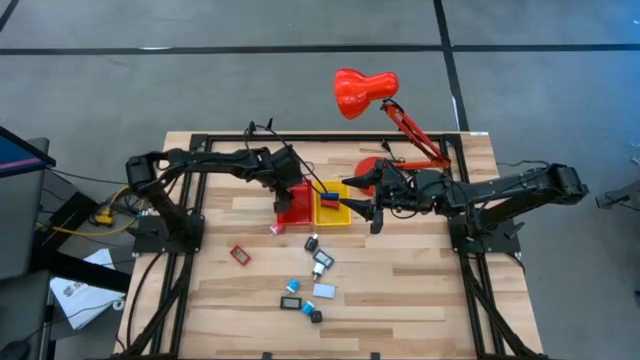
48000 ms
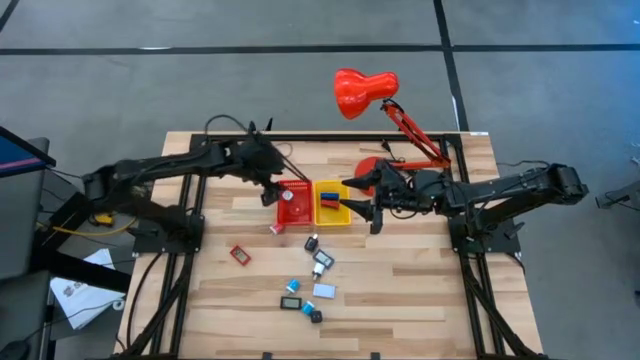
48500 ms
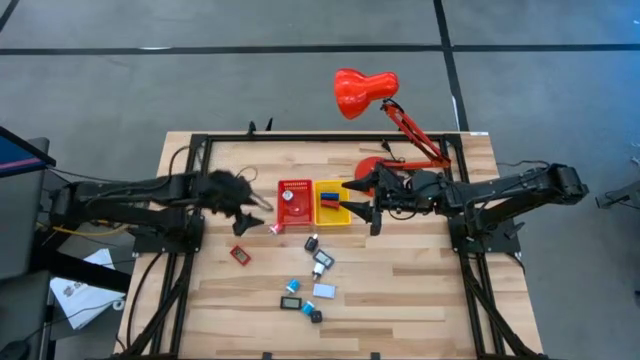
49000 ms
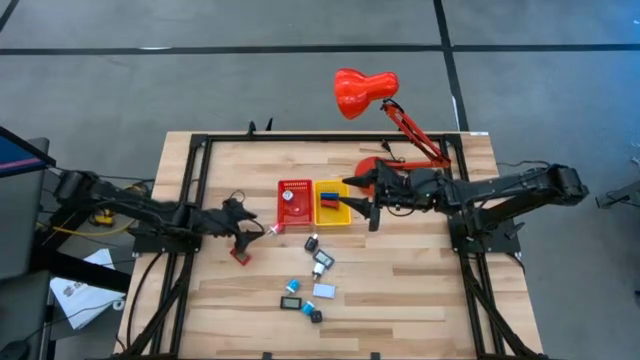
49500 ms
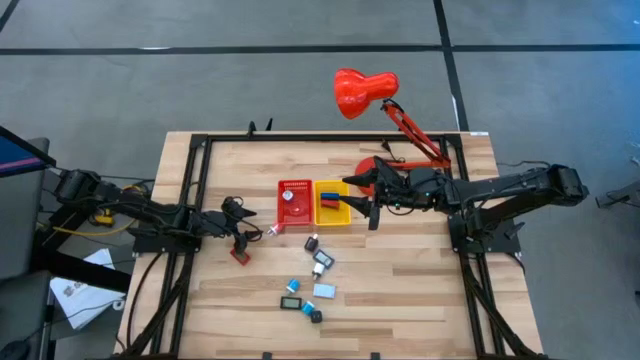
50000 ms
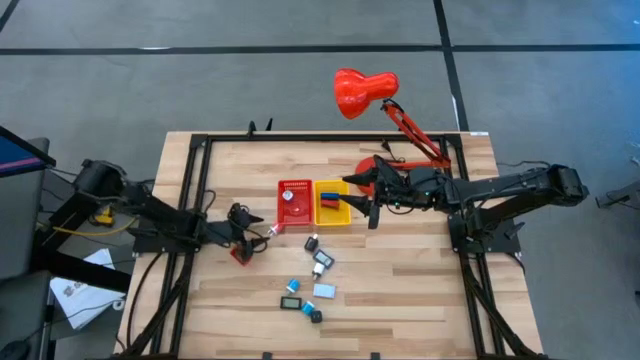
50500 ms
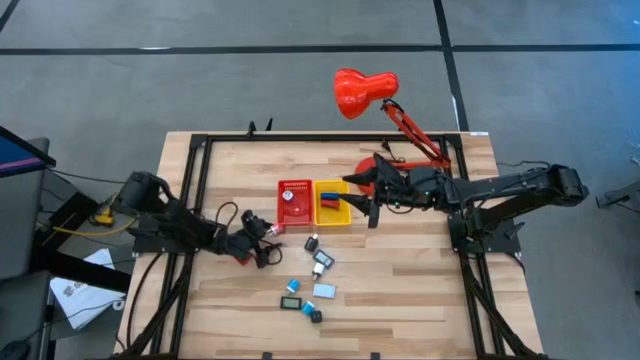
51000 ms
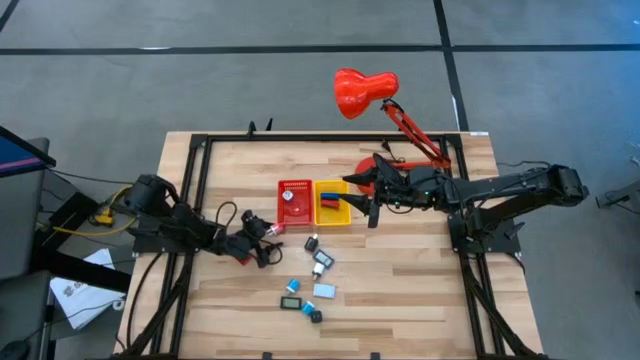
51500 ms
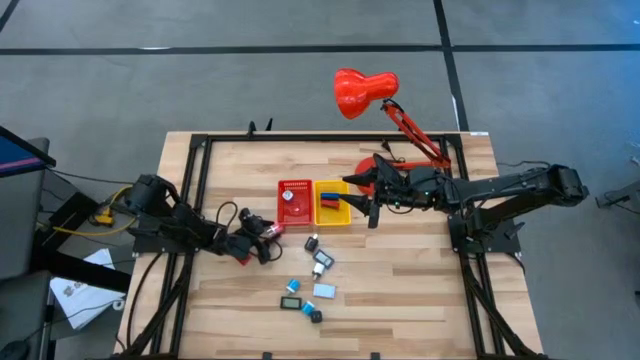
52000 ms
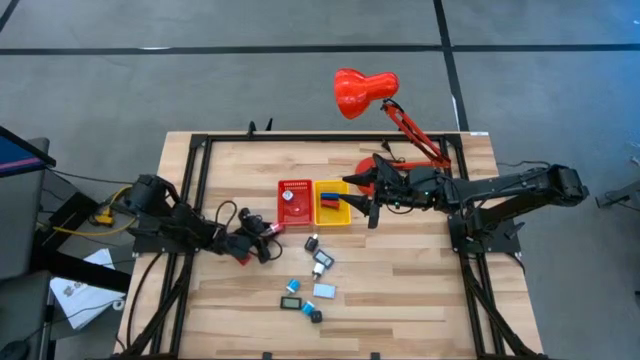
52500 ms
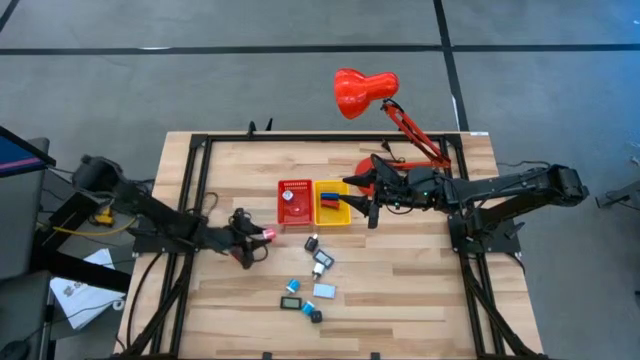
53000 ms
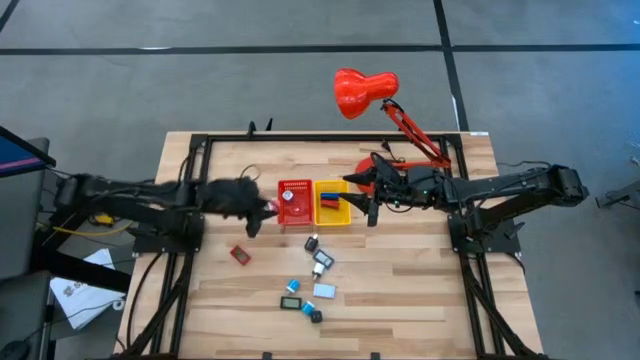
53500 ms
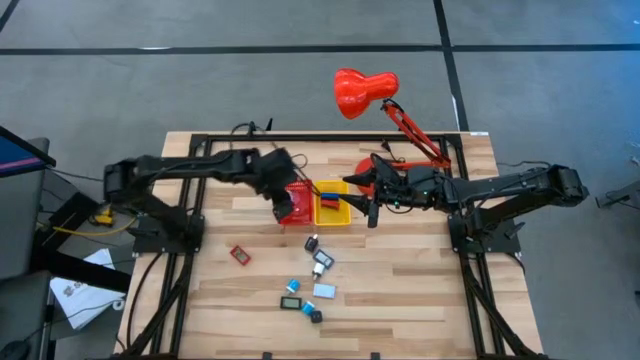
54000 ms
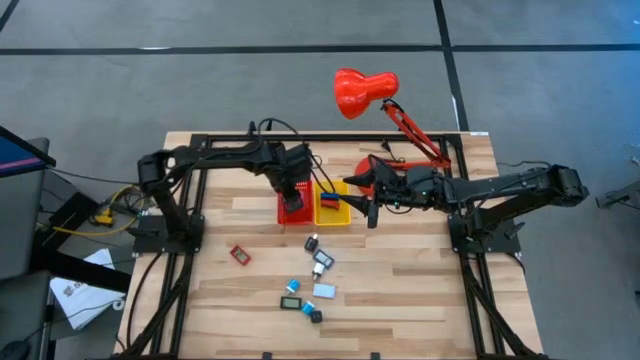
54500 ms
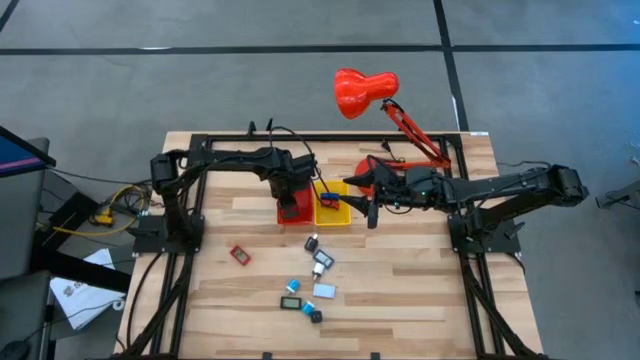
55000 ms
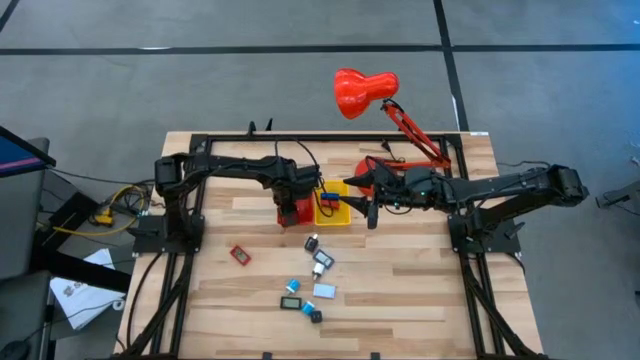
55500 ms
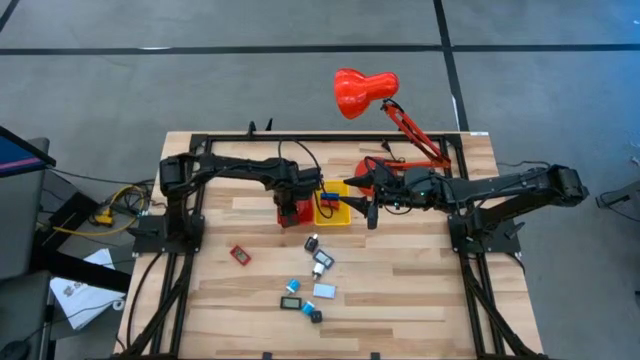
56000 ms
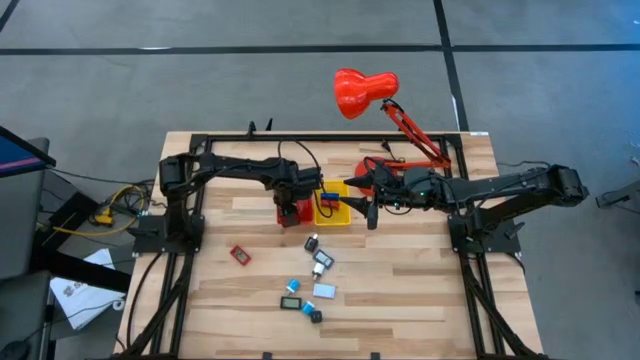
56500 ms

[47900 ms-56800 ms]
Task: Pick & Place Office items
Put the red charger adapter into the red basket

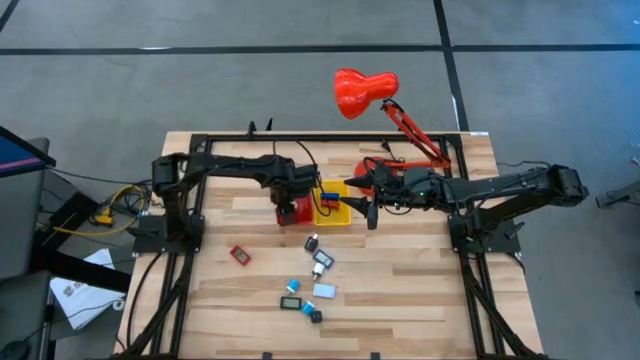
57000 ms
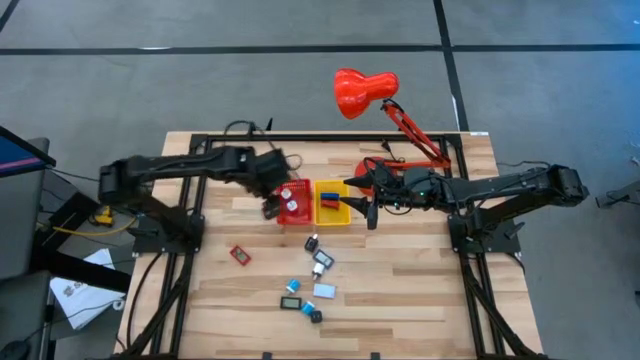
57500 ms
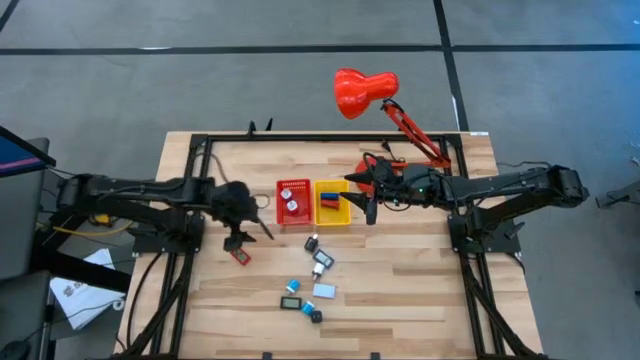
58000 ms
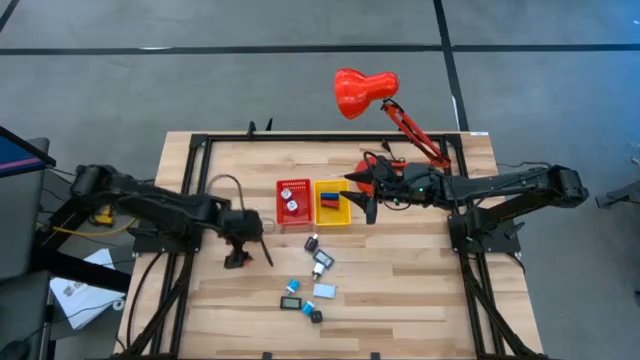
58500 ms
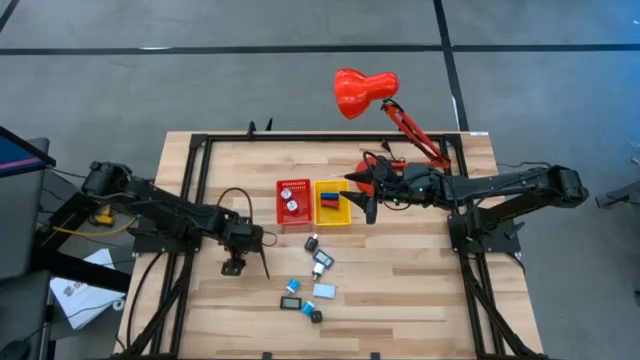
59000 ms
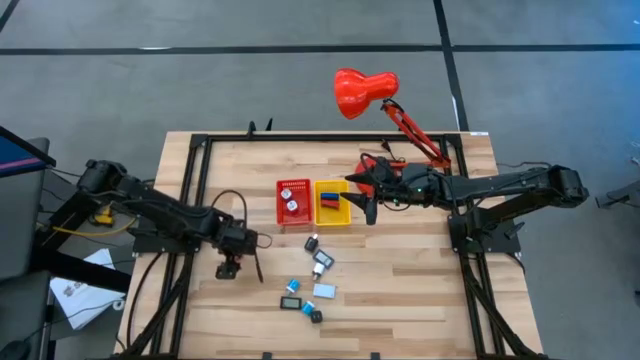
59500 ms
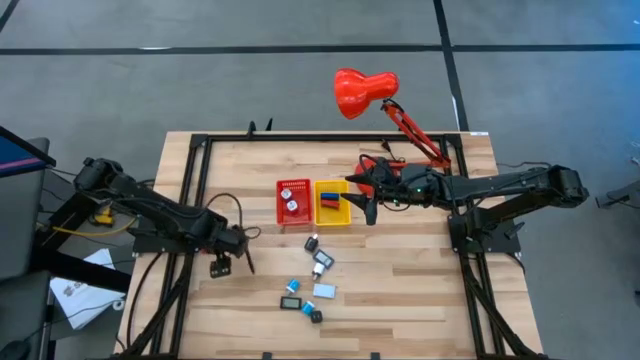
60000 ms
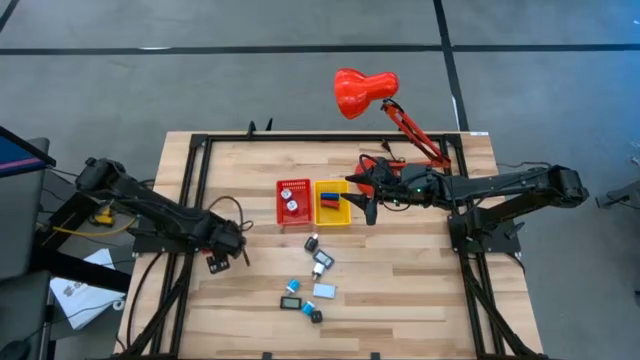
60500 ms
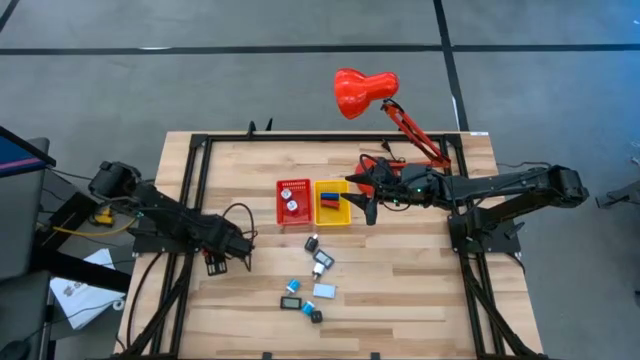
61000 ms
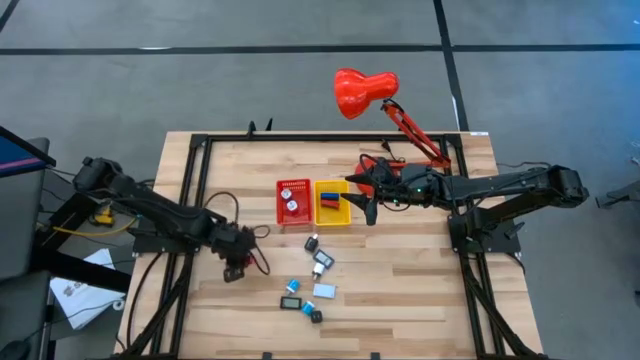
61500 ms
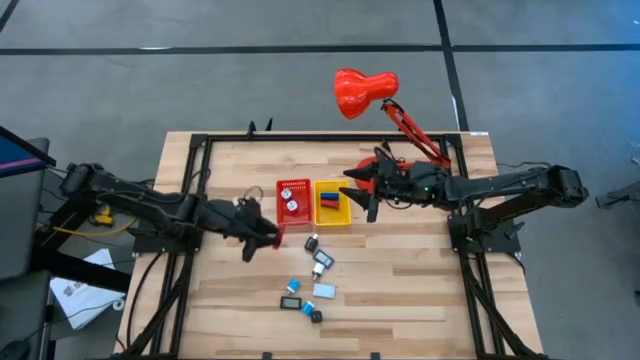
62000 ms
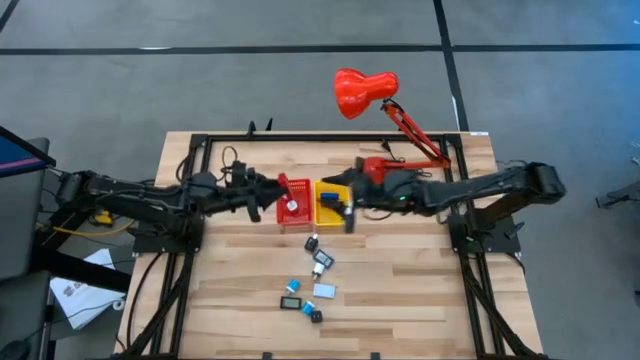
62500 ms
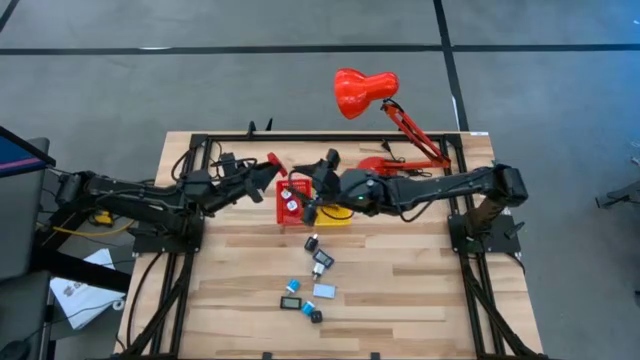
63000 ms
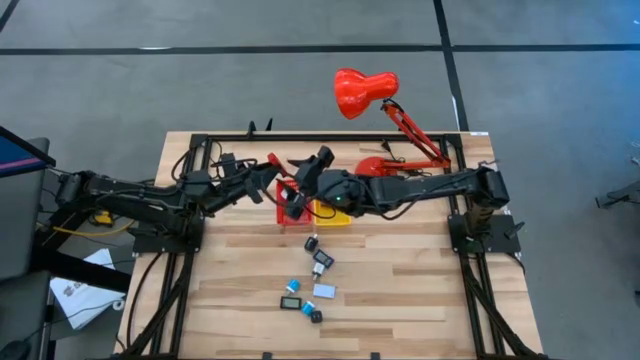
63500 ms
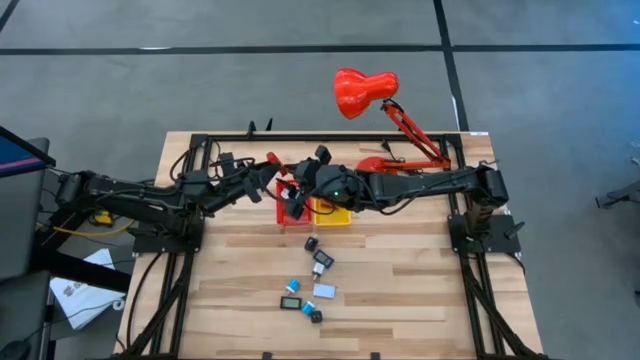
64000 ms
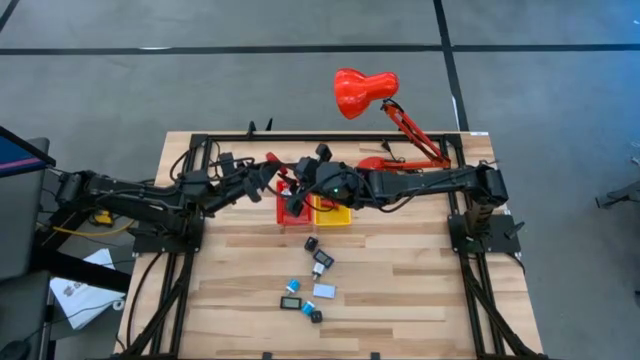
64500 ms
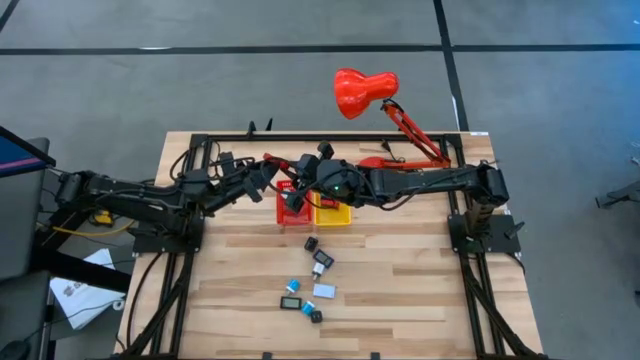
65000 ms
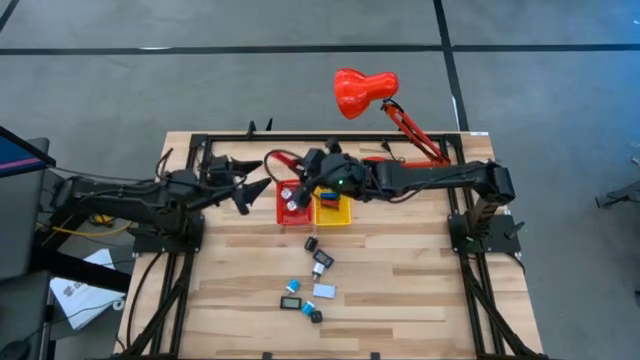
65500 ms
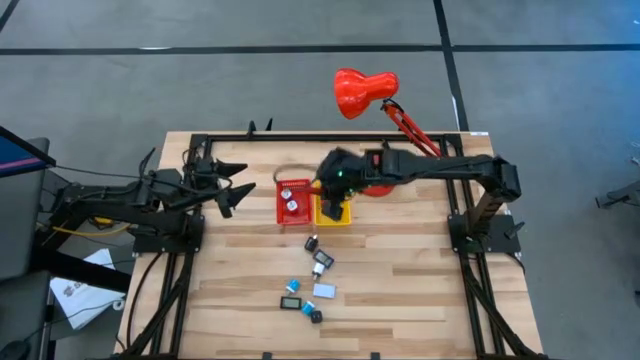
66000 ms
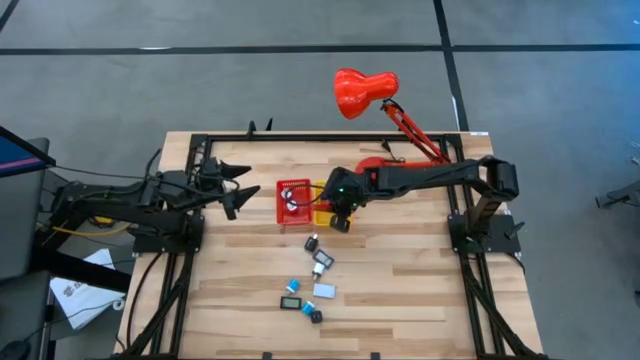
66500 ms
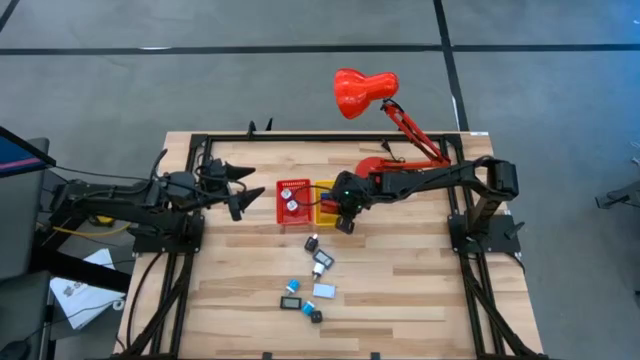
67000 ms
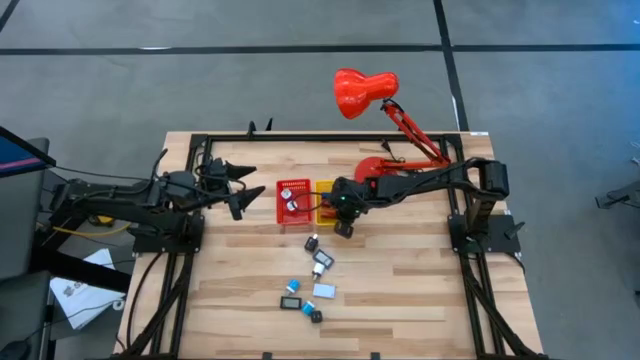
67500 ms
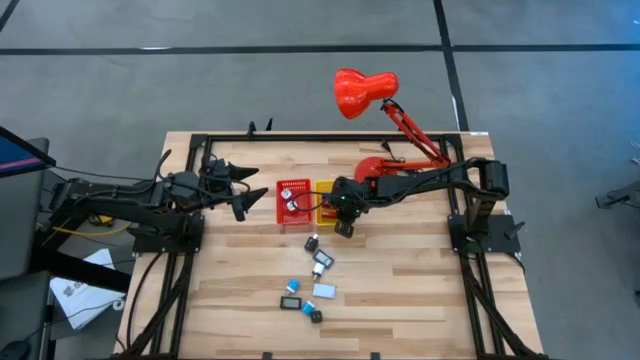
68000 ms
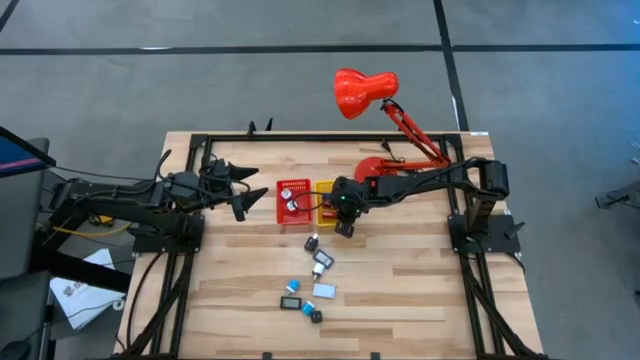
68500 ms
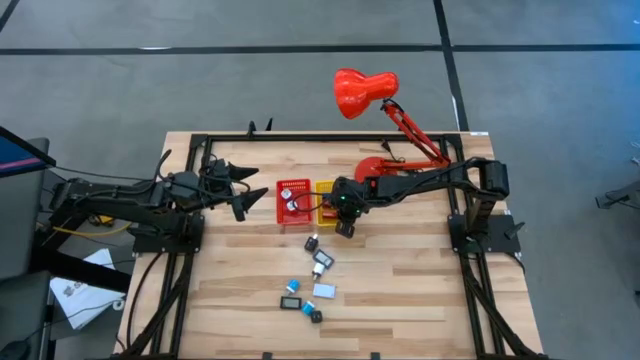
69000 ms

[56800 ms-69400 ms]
Put the red digital timer into the yellow basket
